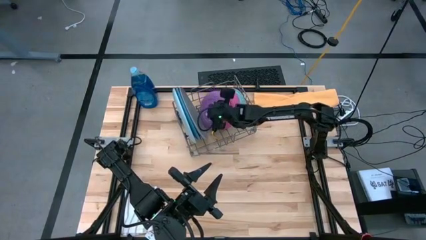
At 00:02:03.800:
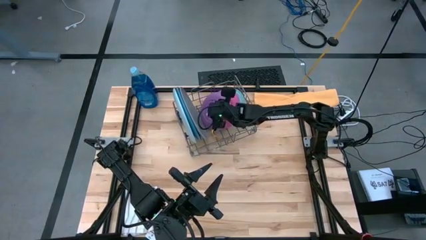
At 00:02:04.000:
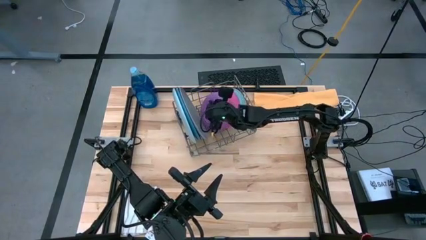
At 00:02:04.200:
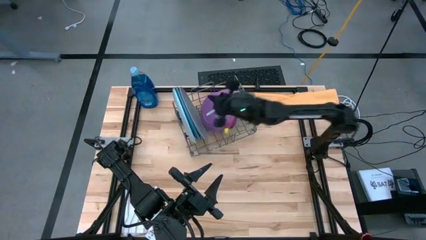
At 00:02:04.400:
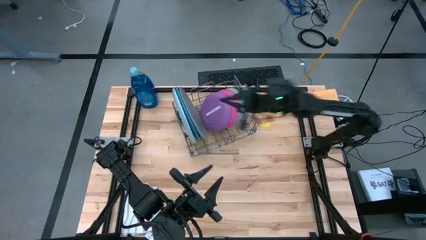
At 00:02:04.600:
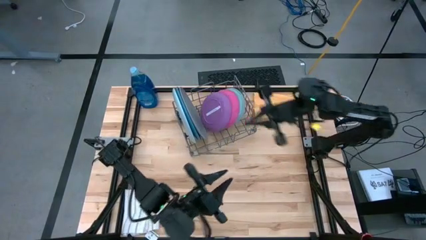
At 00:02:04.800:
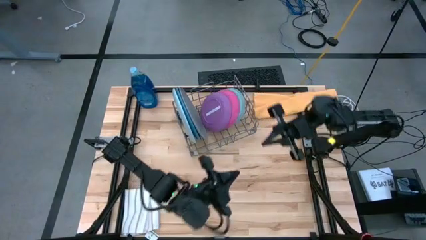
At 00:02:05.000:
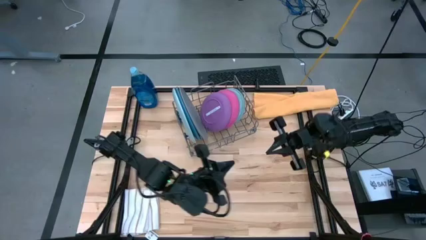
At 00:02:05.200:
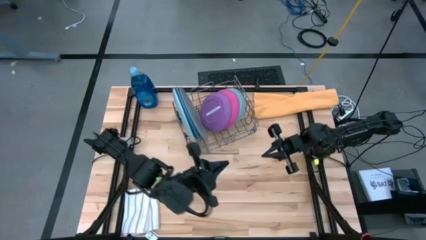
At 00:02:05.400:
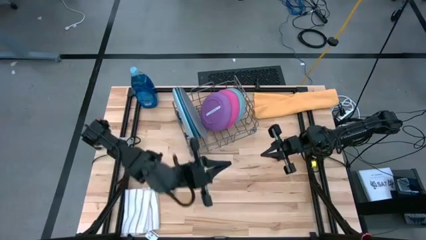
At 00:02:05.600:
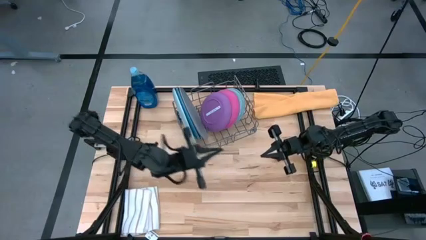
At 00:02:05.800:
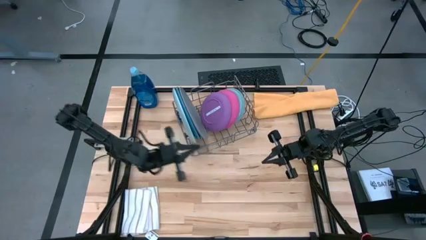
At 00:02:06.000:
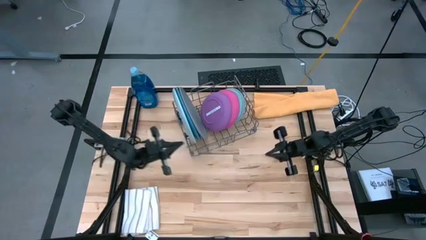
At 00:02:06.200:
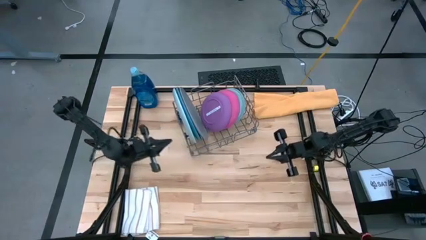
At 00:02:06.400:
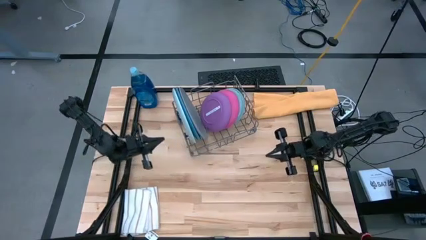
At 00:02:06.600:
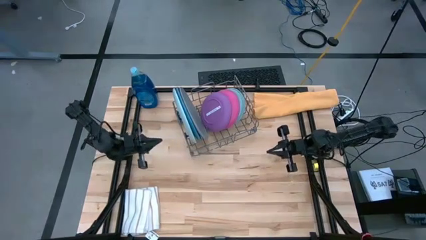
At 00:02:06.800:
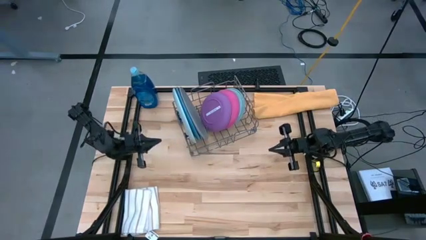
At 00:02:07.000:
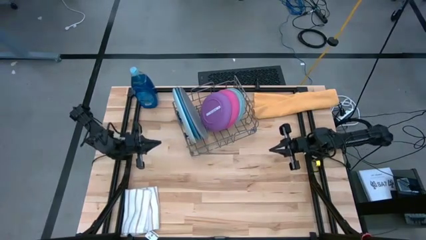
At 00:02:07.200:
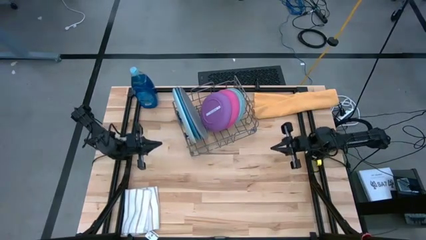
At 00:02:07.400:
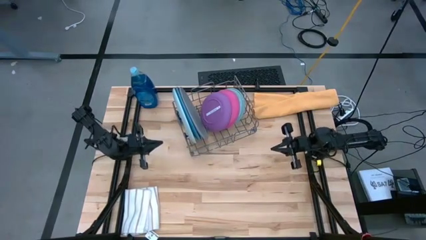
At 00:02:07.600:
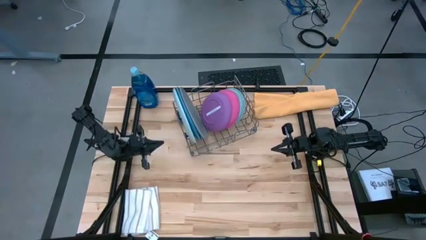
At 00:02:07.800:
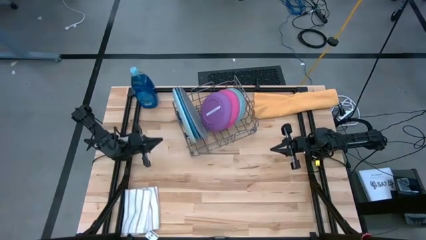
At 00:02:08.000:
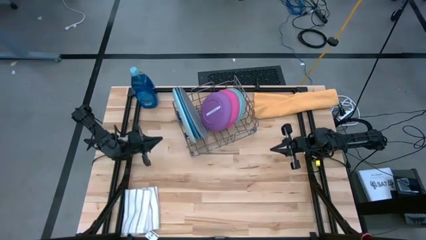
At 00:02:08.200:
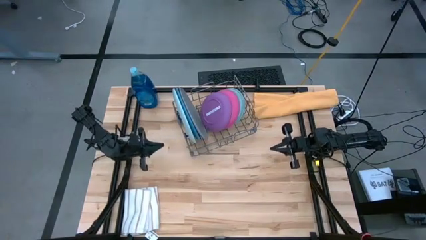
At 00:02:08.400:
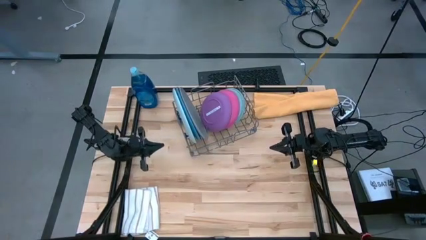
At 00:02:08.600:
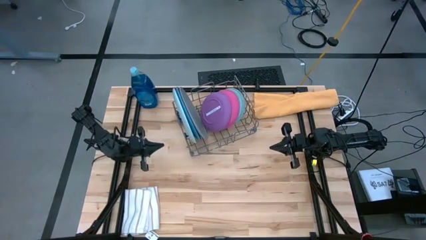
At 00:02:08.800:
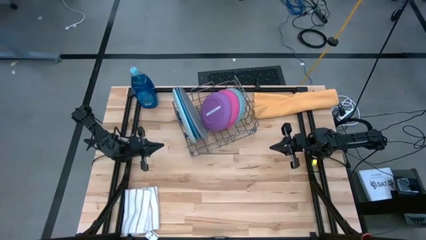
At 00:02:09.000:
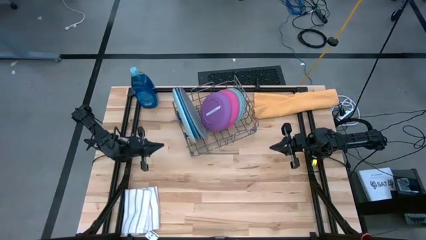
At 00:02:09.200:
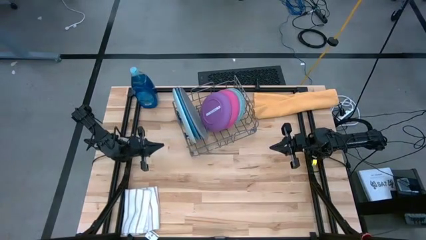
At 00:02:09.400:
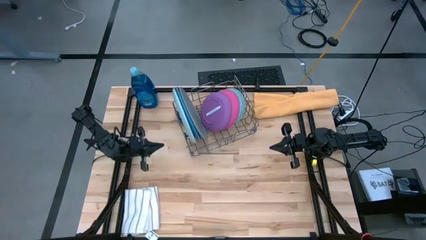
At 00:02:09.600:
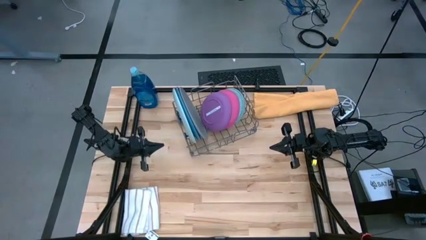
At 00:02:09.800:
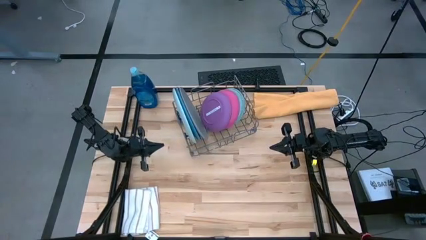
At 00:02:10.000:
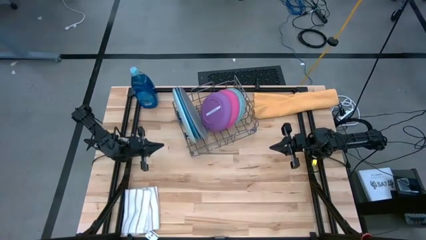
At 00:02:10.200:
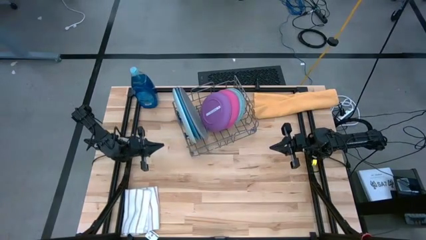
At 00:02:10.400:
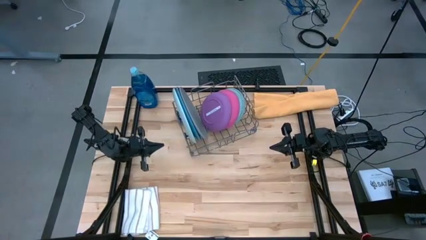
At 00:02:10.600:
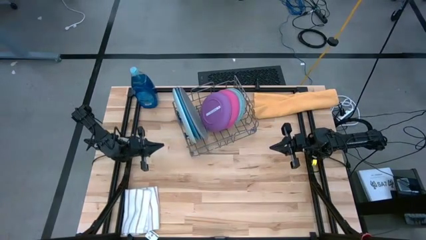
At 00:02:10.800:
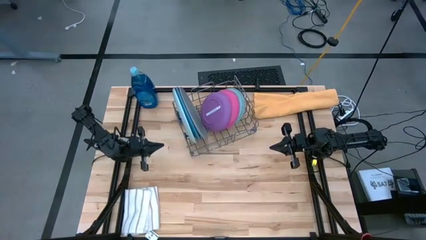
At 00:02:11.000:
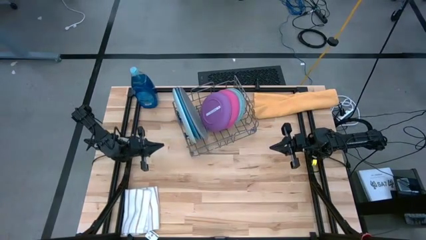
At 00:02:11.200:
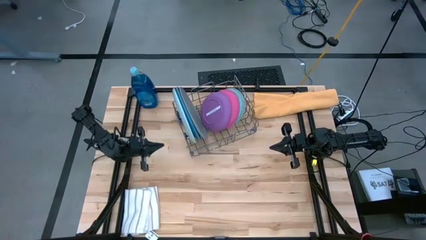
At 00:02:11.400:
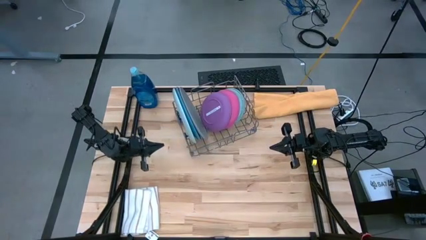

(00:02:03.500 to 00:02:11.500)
Task: Sort dishes
Return to Home Position

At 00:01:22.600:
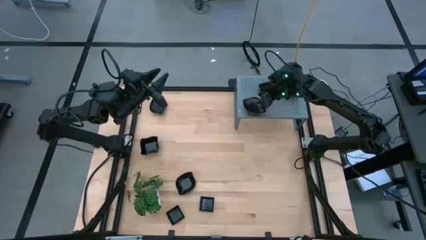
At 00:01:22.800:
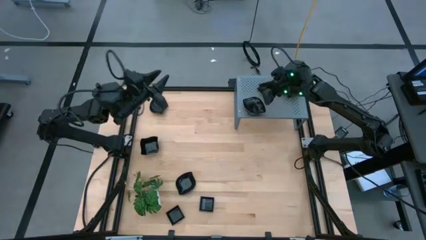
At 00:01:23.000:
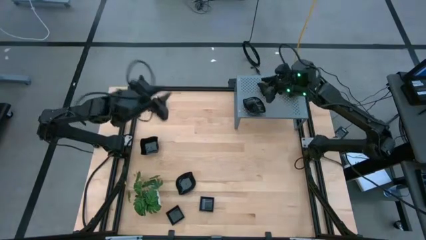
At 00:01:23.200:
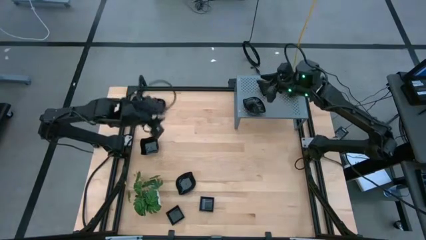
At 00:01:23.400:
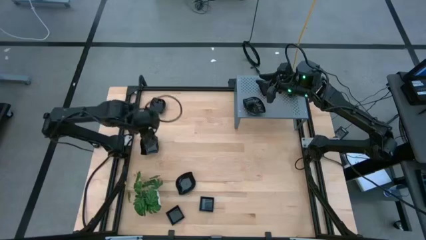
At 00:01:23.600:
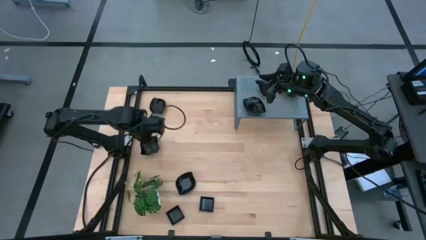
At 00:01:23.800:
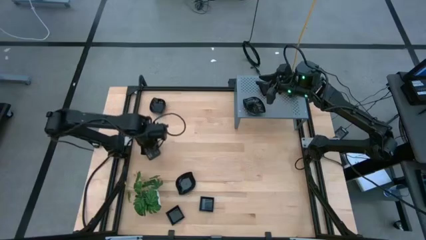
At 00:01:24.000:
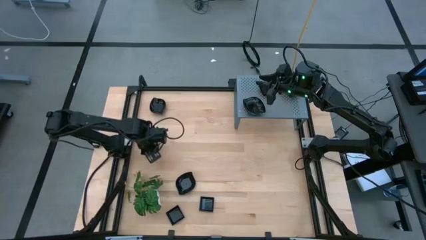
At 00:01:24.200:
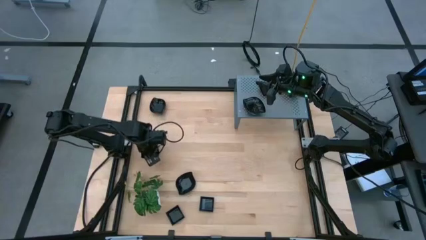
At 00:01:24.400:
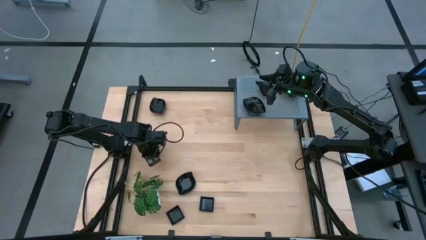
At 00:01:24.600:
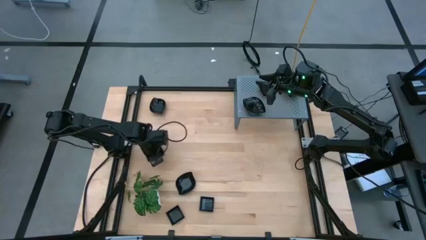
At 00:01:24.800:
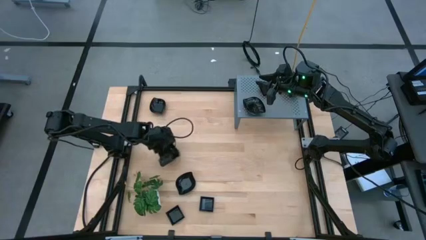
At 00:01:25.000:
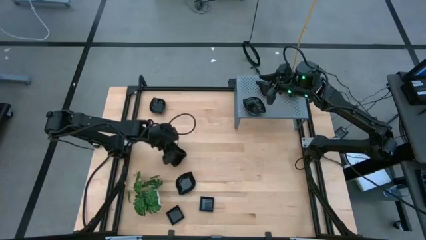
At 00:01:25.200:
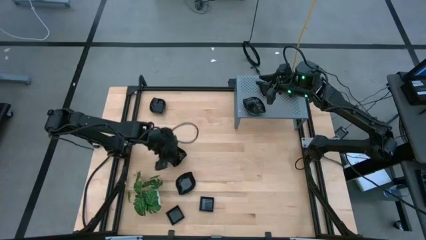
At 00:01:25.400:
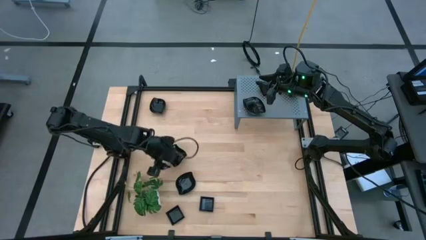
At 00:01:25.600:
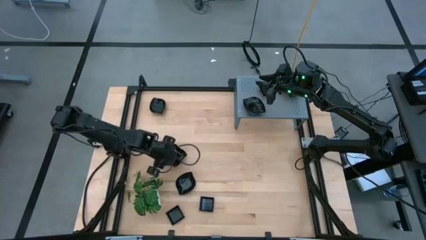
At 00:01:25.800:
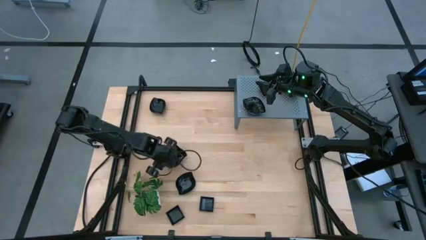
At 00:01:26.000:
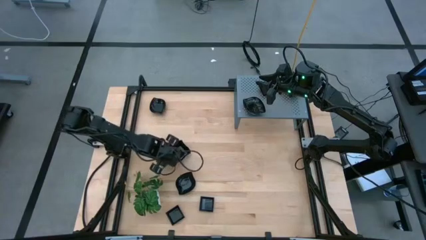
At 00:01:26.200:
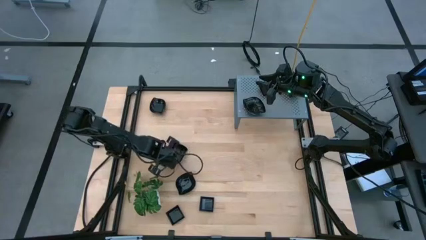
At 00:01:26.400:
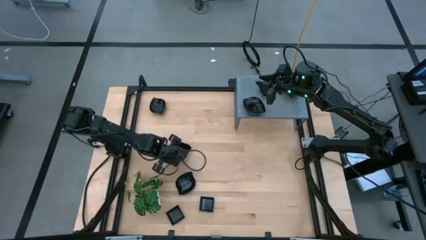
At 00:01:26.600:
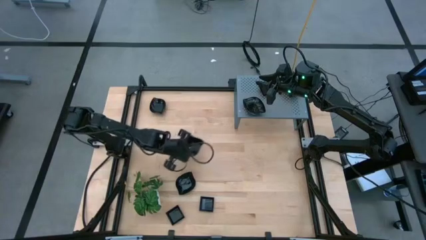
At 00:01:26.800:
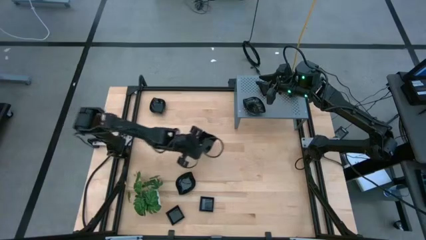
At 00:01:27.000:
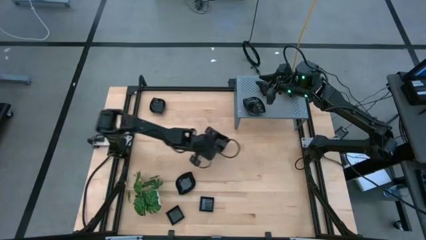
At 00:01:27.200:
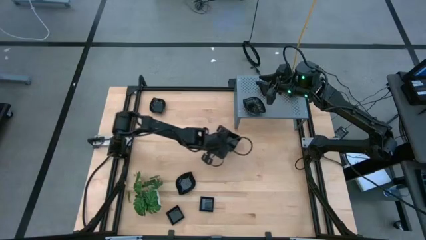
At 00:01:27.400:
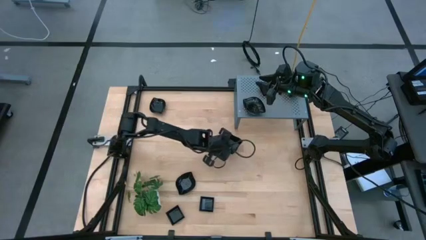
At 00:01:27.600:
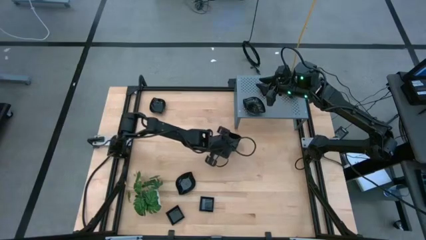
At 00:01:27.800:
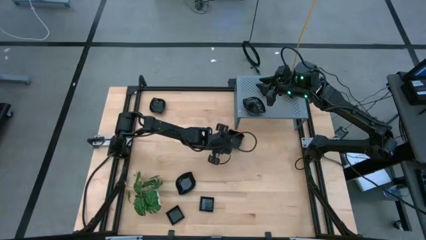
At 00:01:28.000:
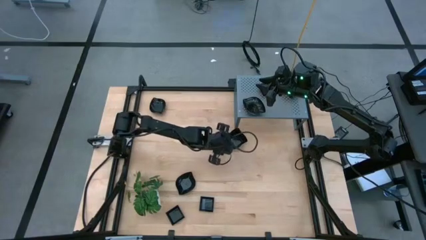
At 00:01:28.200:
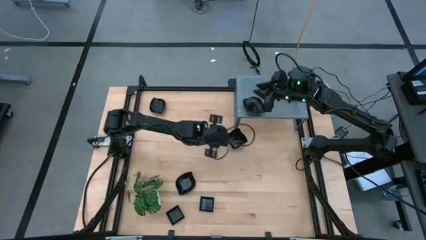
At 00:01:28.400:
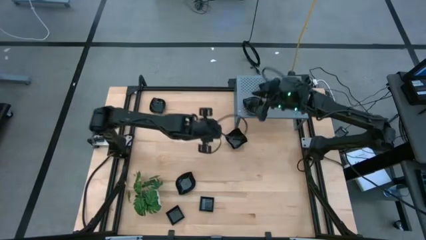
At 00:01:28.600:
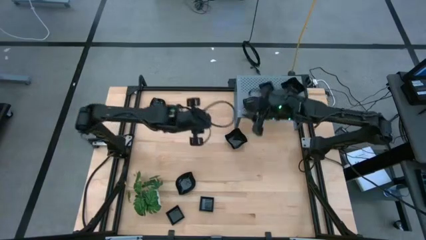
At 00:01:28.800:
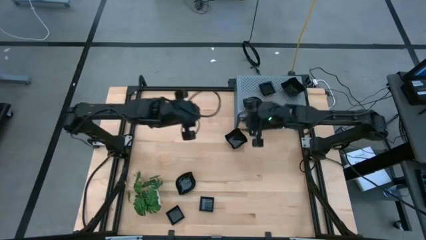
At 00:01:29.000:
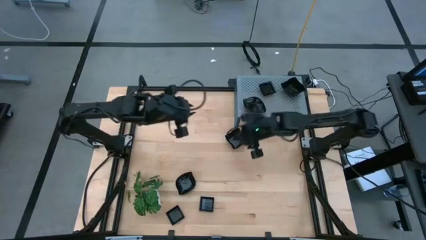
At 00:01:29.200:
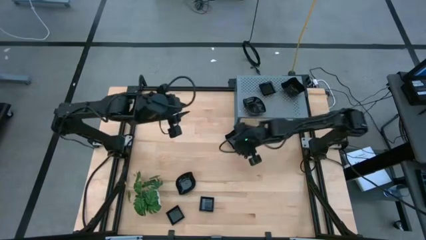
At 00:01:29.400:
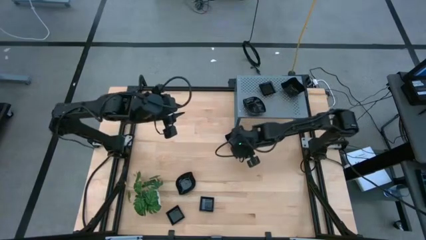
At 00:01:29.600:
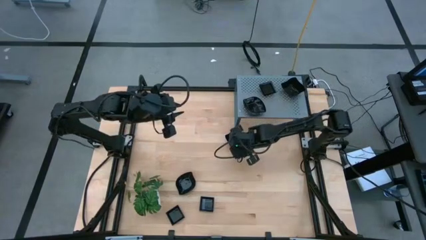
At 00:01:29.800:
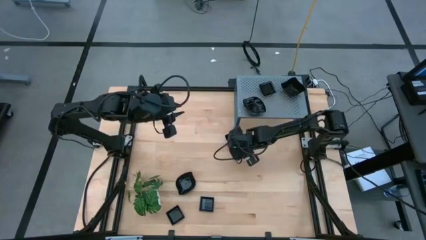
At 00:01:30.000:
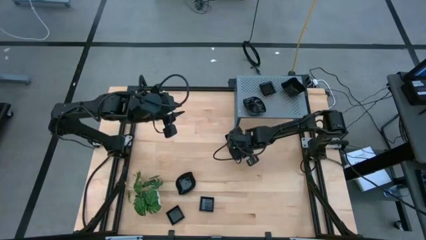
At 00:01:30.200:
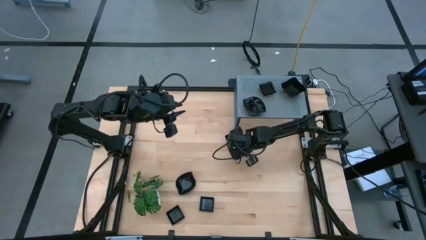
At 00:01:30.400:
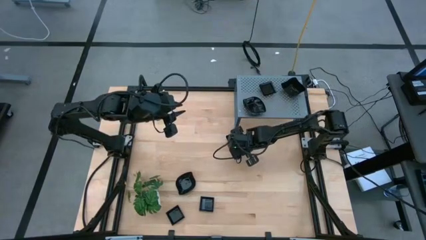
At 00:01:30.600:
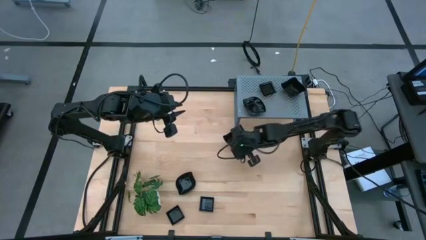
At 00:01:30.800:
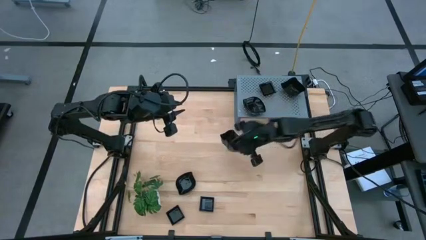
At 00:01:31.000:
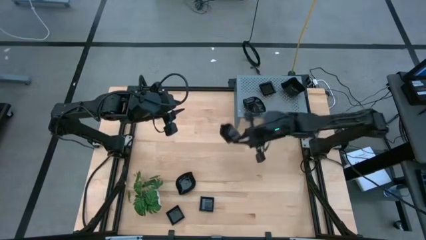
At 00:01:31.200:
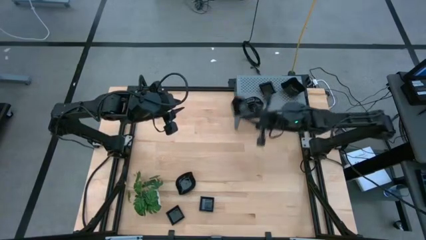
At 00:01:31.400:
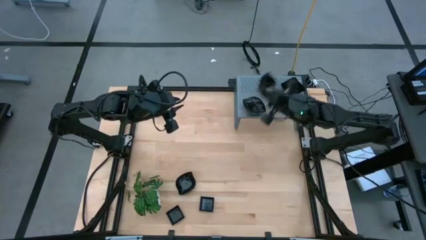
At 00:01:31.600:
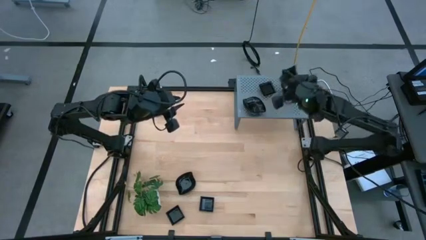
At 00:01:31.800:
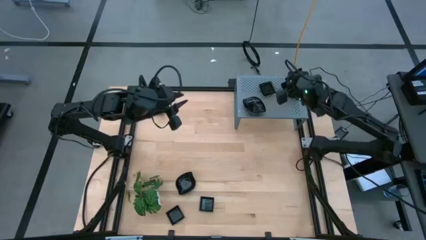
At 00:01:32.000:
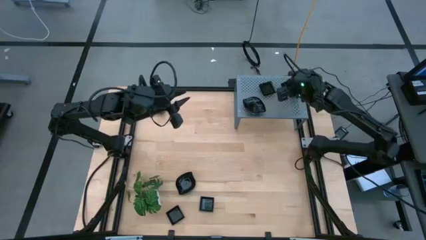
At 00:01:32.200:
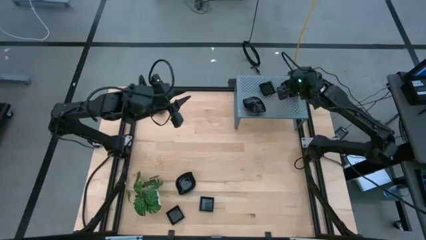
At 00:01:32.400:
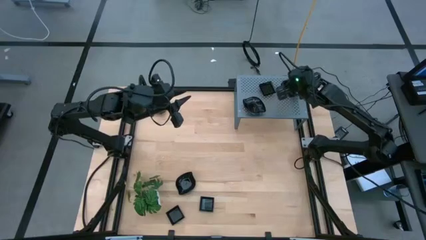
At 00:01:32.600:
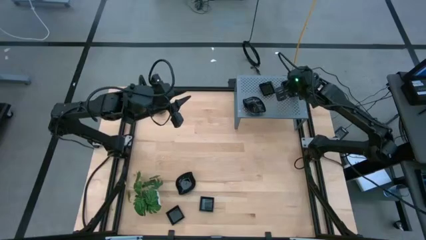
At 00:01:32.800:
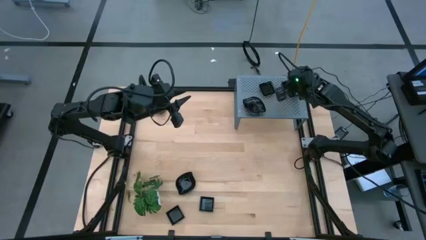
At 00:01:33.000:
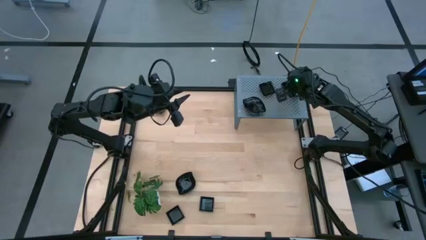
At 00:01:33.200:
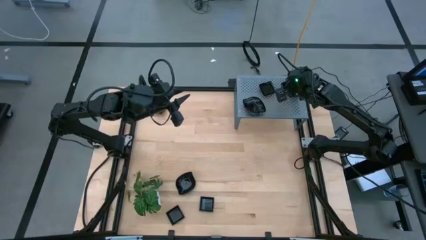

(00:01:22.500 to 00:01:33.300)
Task: Pick & Place Mini shaped plates
Stack the distorted square plate on top of the other distorted square plates
